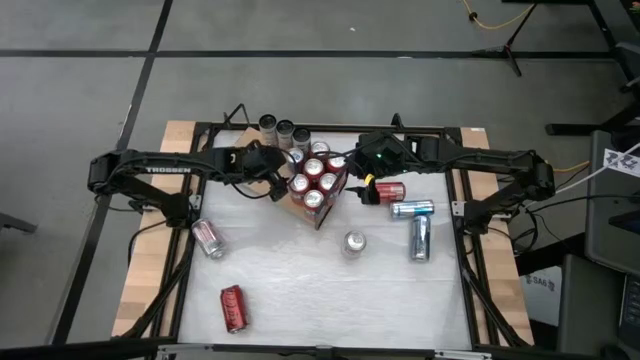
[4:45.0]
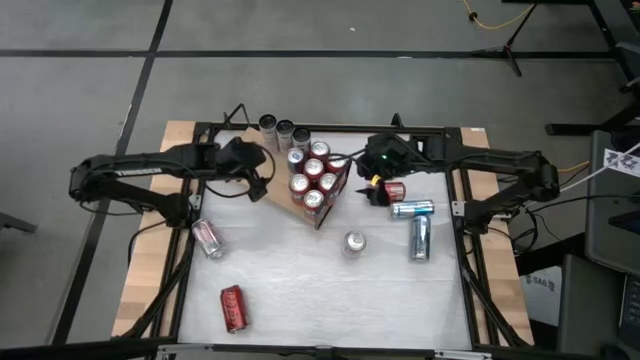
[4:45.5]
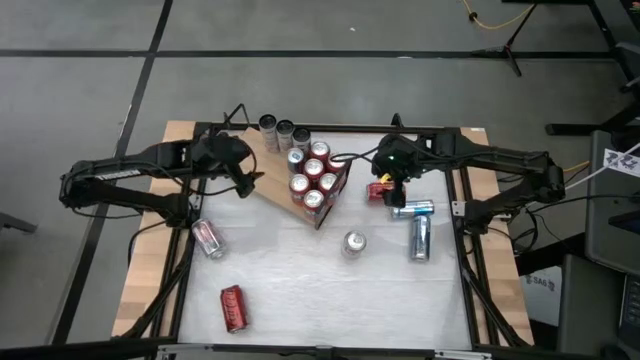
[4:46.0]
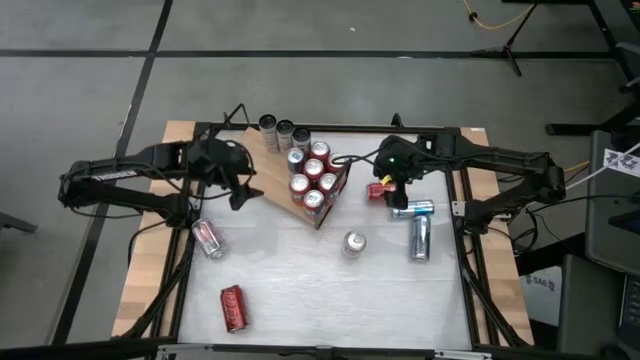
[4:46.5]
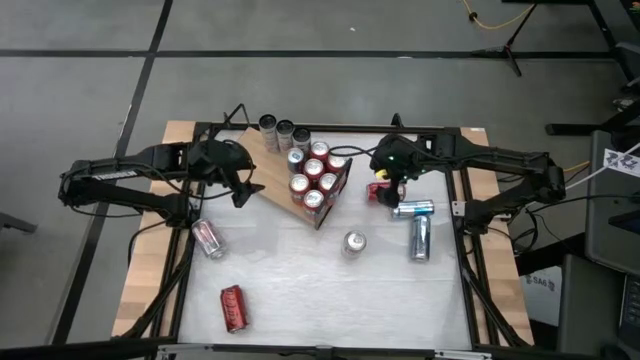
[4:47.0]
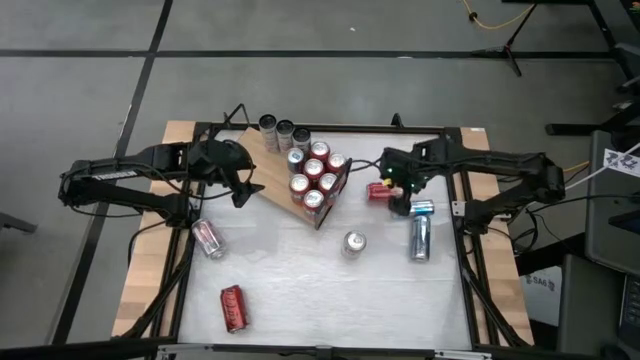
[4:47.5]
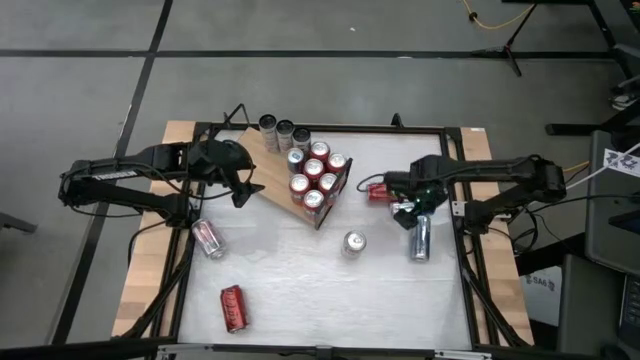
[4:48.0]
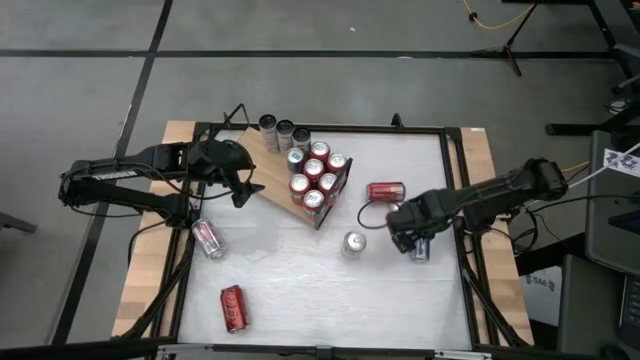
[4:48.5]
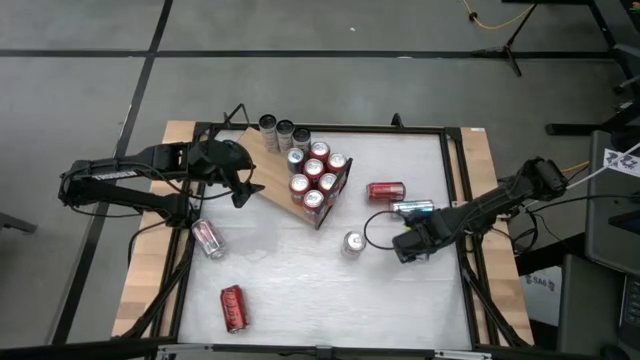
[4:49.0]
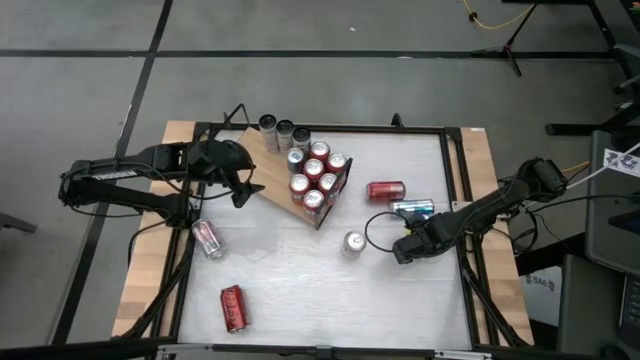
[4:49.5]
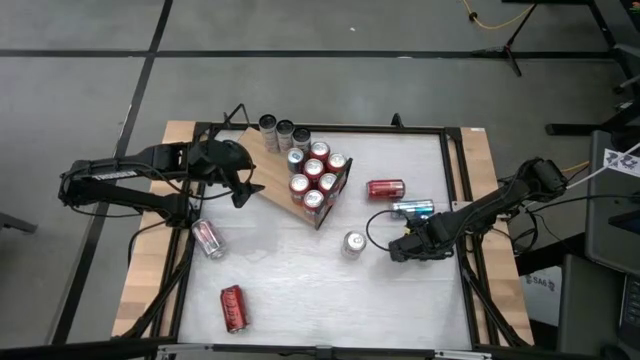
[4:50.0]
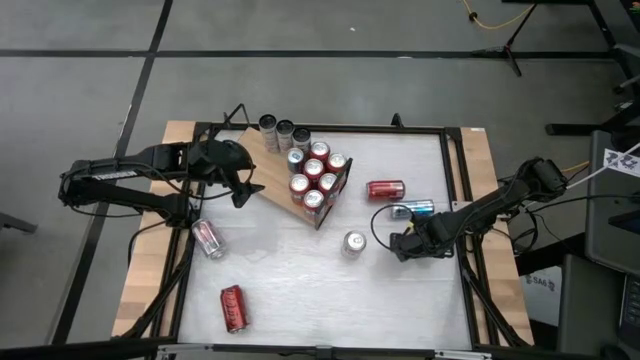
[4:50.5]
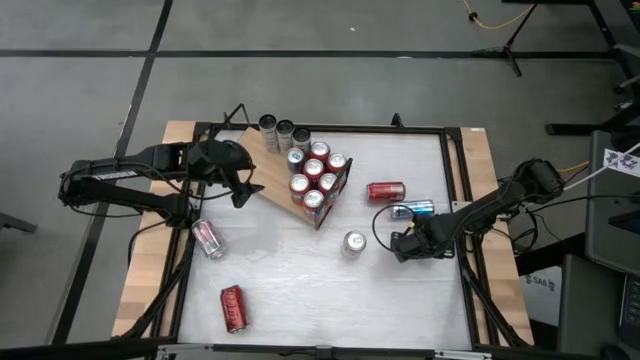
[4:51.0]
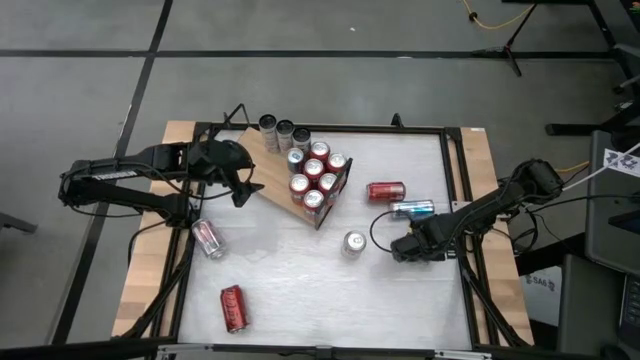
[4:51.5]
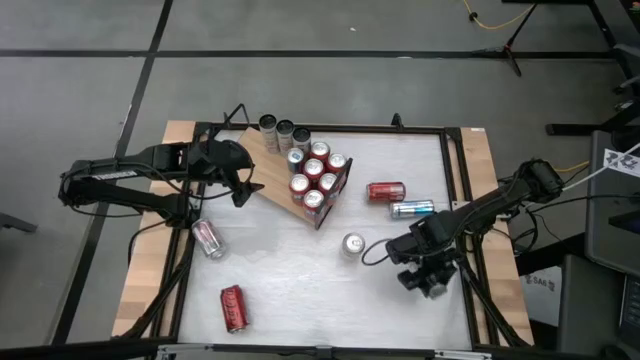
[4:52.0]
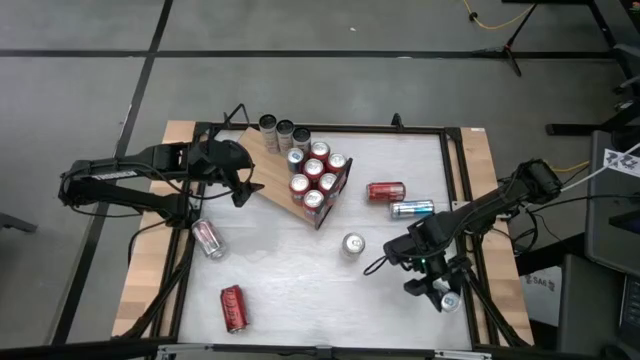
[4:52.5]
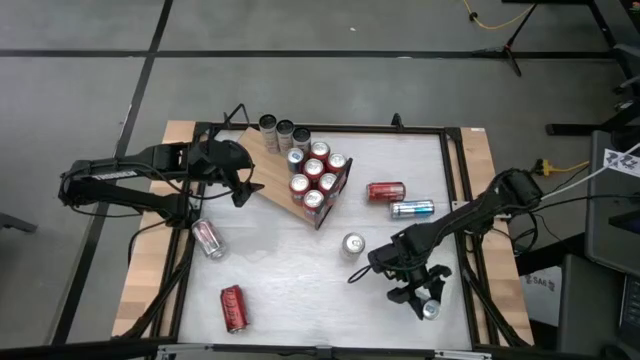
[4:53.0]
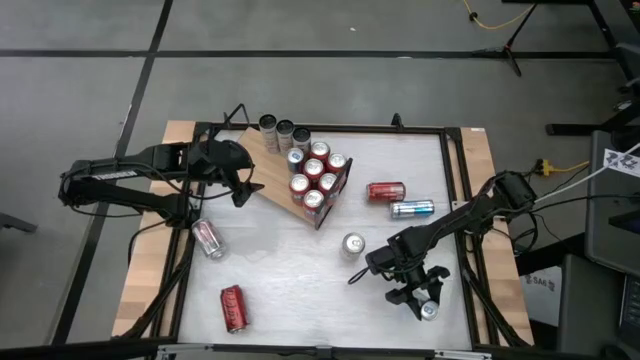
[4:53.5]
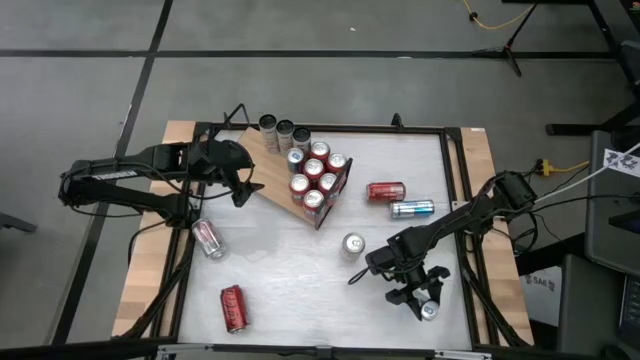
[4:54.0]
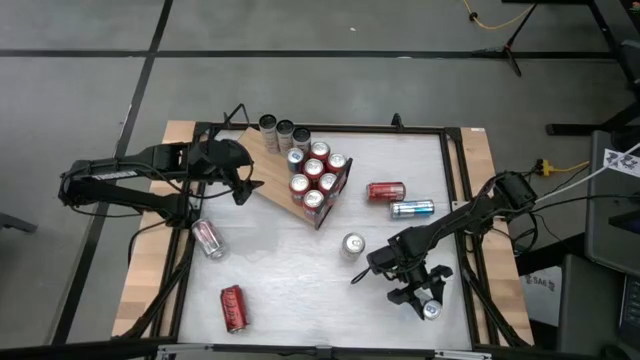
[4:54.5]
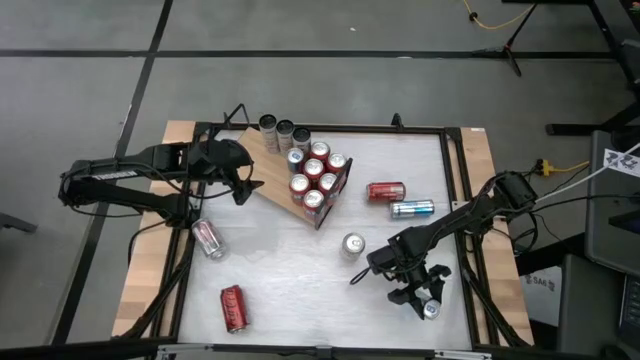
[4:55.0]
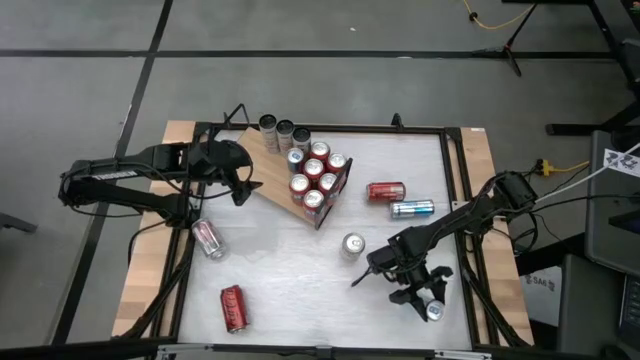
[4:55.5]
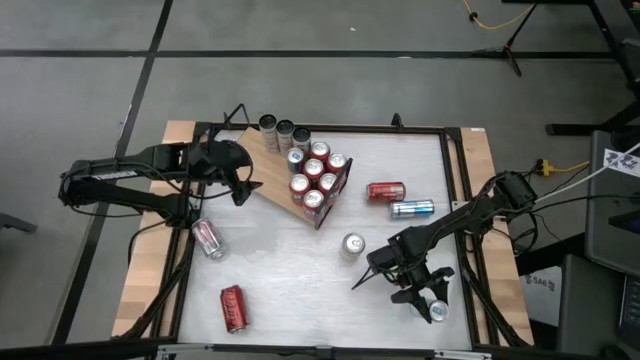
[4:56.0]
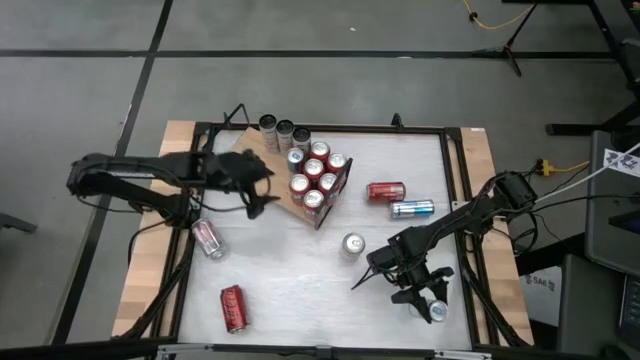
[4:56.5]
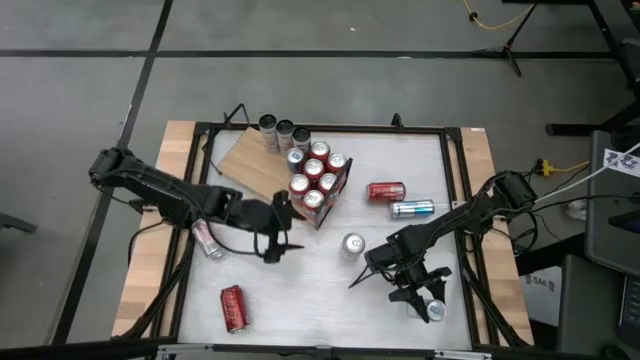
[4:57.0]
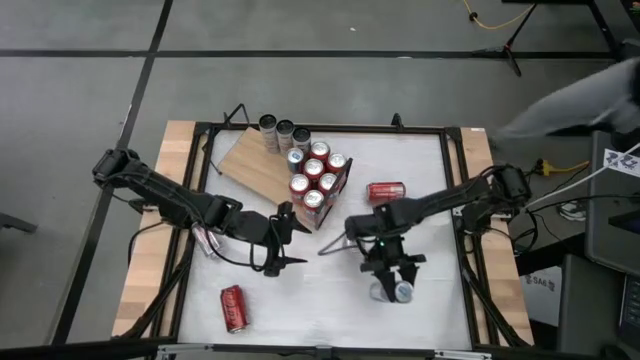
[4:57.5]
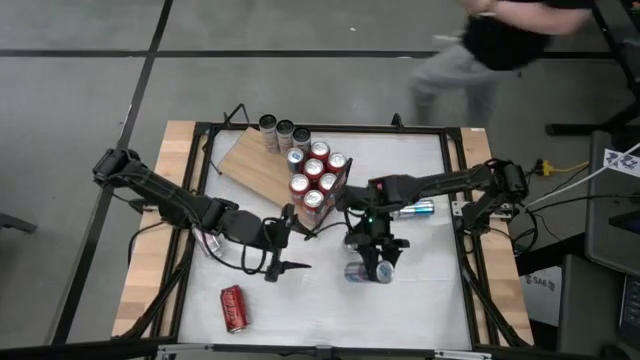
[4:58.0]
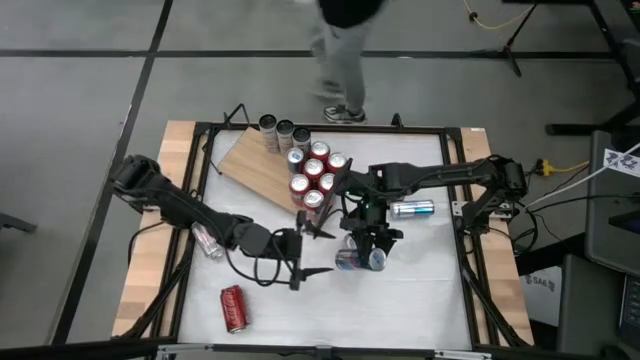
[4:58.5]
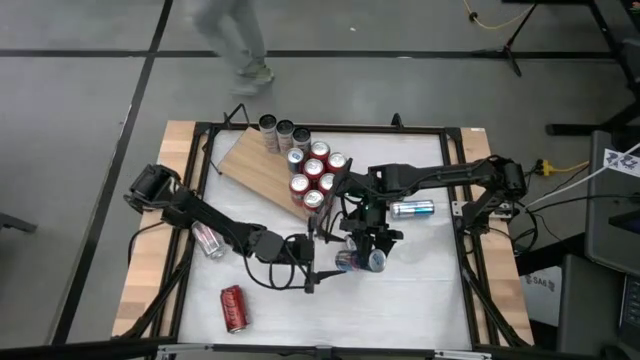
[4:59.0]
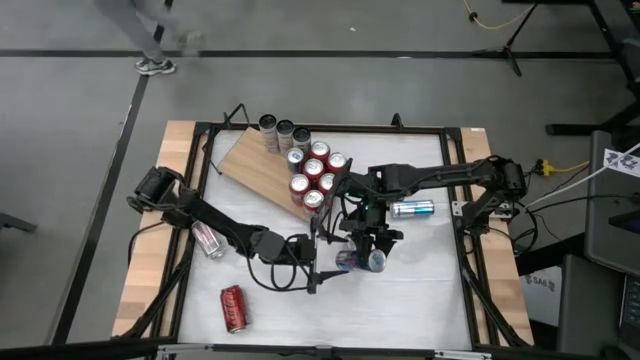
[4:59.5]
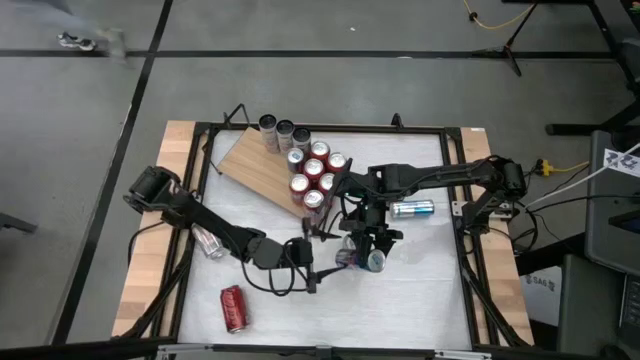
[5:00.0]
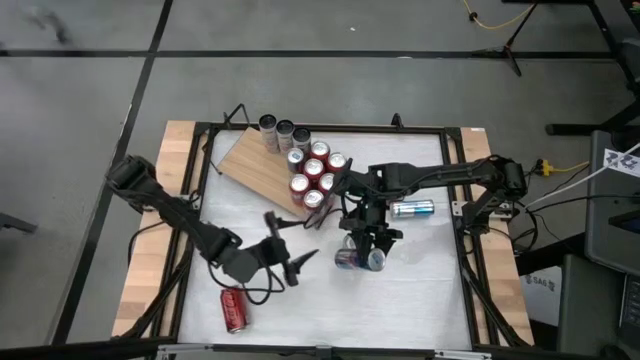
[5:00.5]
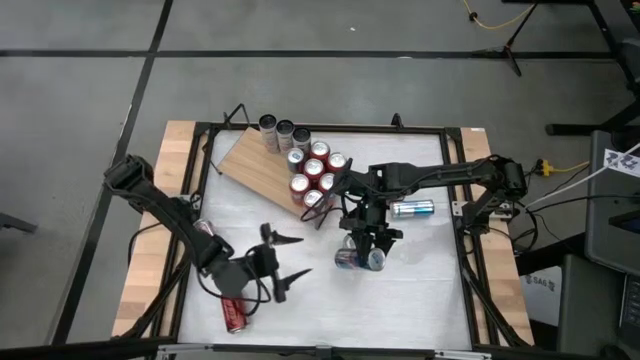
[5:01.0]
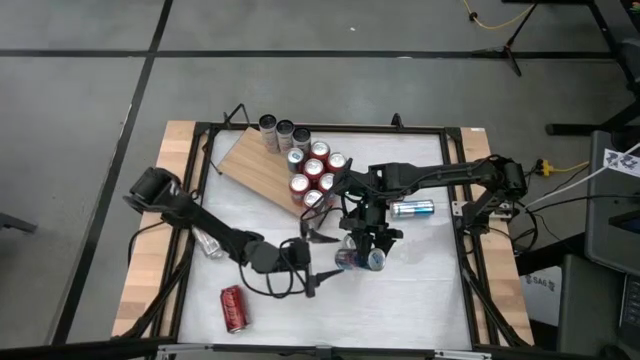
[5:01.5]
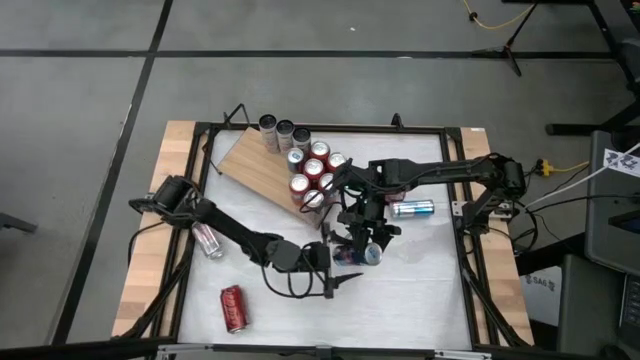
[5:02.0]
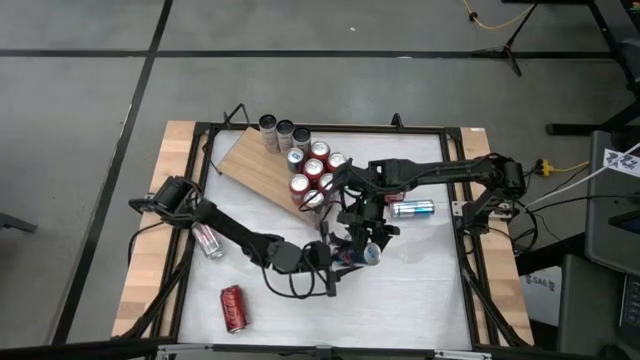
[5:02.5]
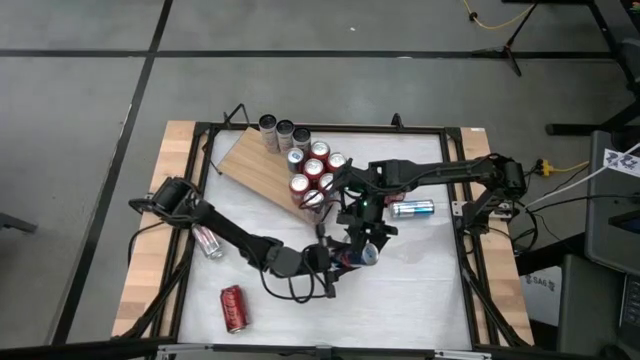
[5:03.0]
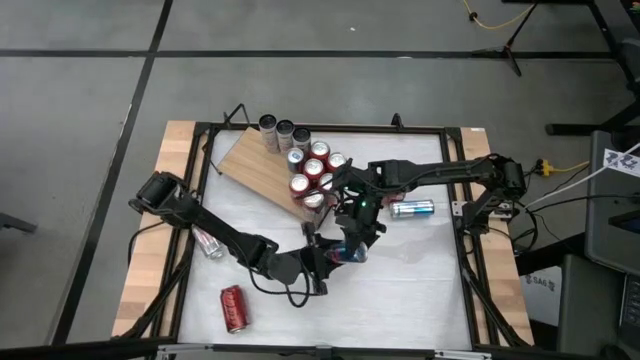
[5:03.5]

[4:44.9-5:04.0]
Task: Pick and place cans onto a shelf
Put the bottom blue and white soda can on the shelf aligned with the other blue and white soda cans

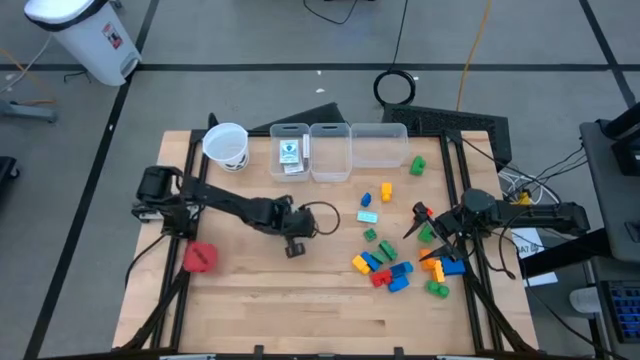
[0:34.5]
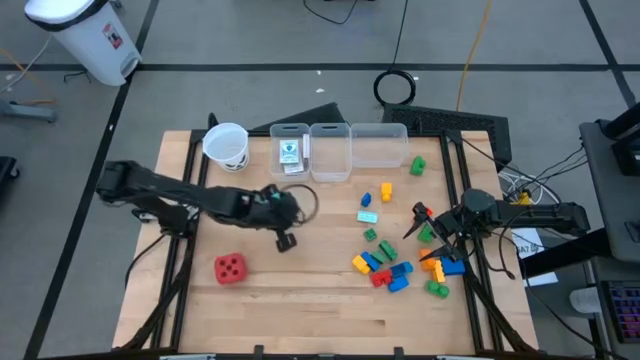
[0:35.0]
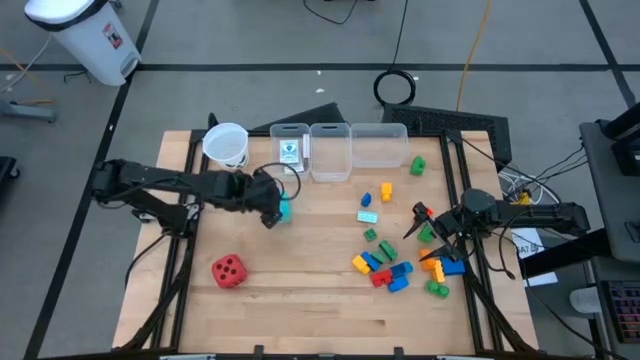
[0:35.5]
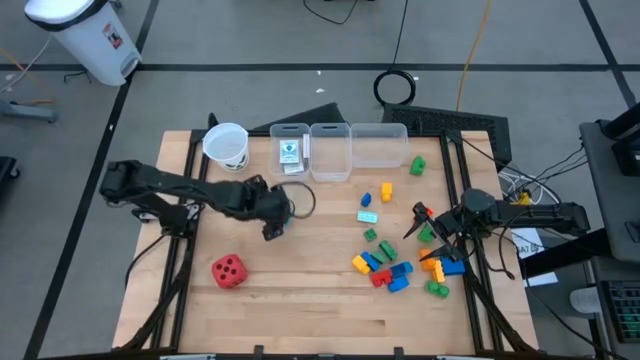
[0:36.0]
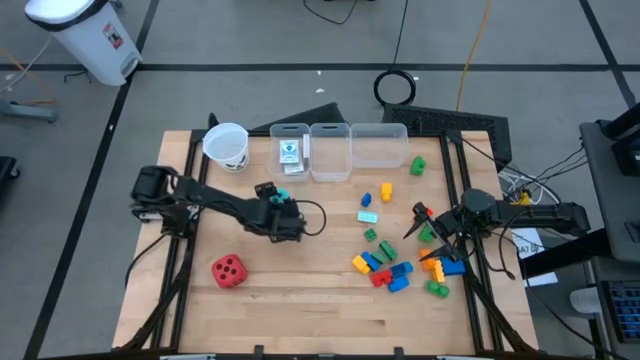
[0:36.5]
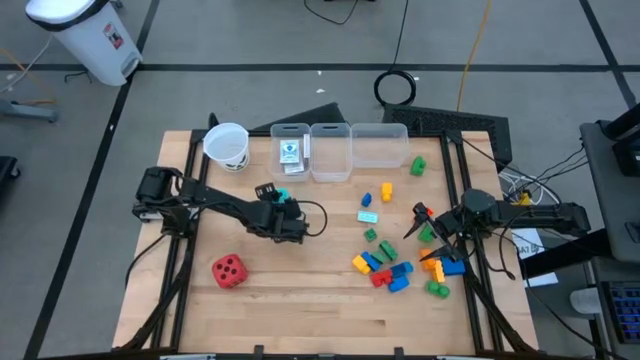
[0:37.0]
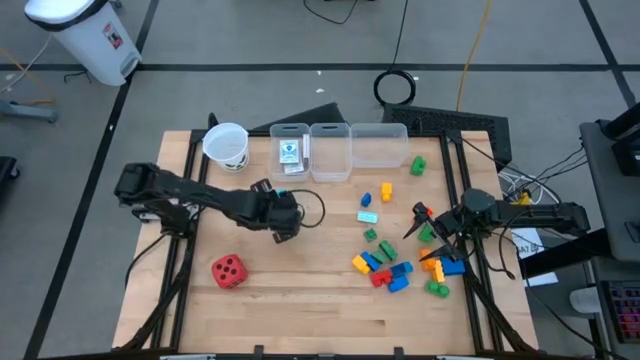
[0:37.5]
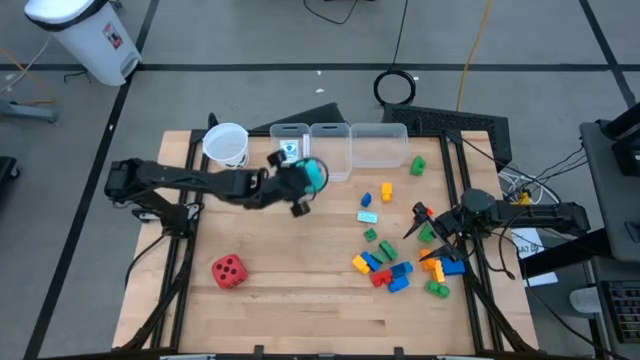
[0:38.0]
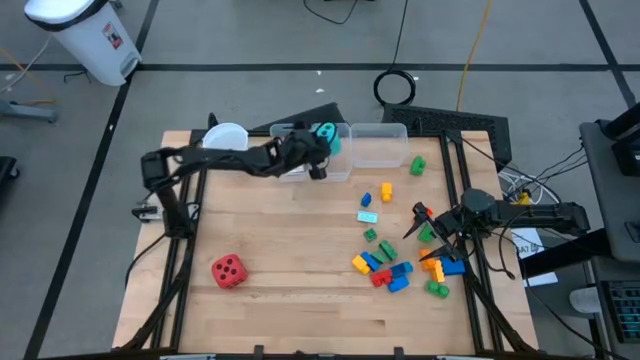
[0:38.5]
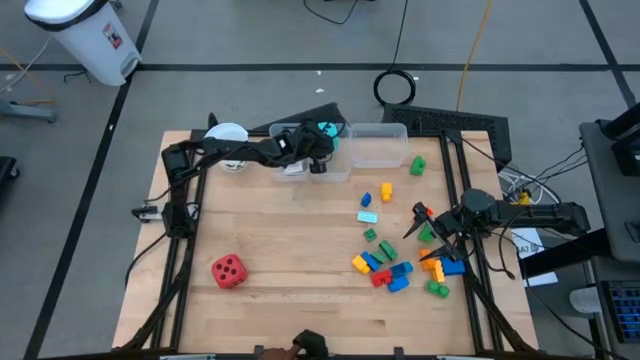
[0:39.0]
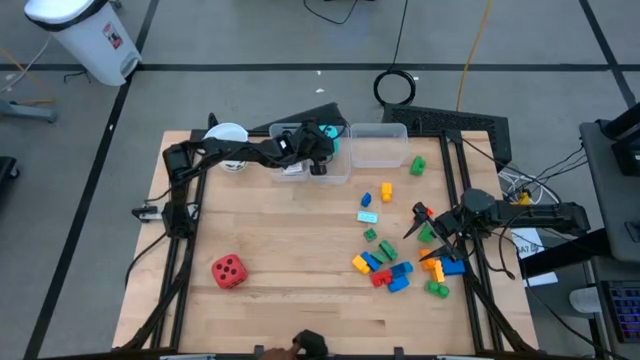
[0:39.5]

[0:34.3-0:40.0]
Task: Pick & Place Toys
Put the light blue dice into the middle transparent bin
